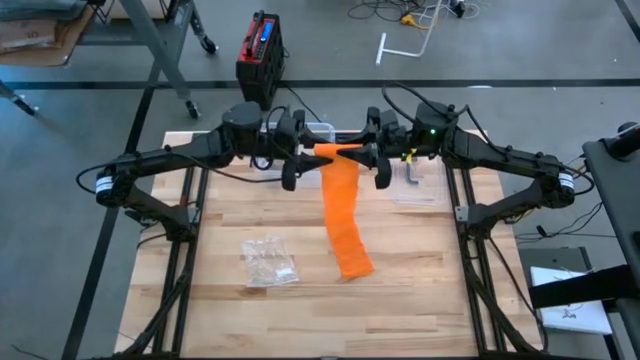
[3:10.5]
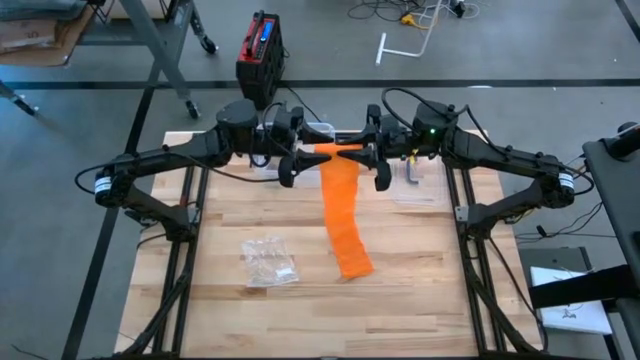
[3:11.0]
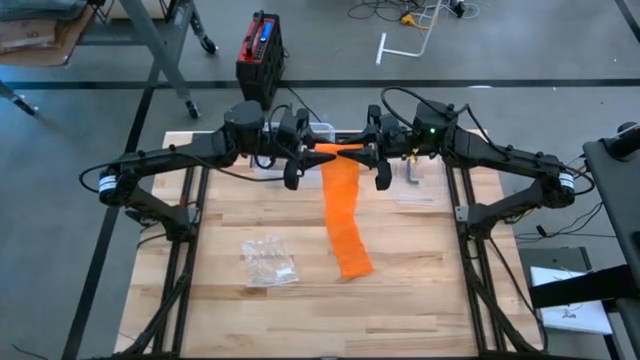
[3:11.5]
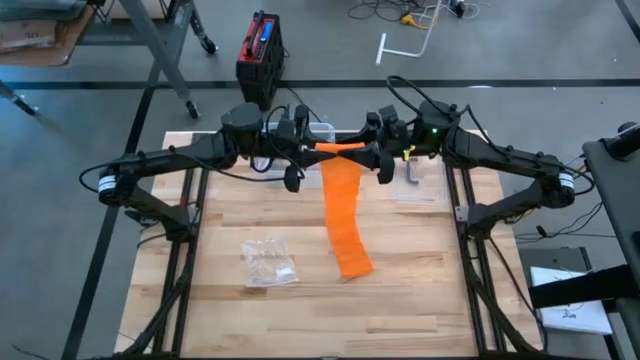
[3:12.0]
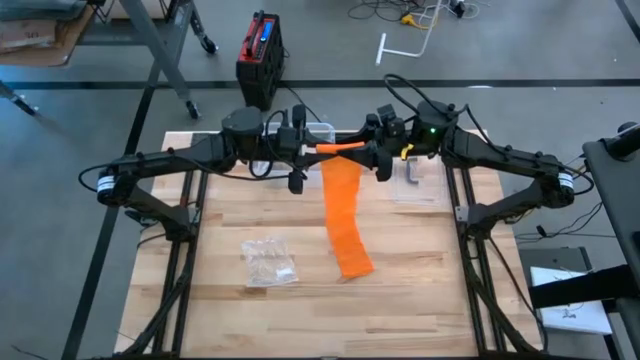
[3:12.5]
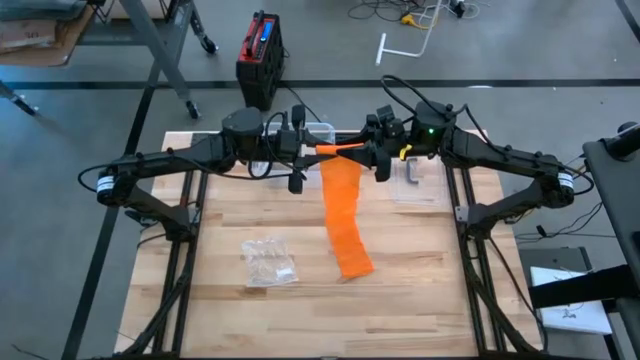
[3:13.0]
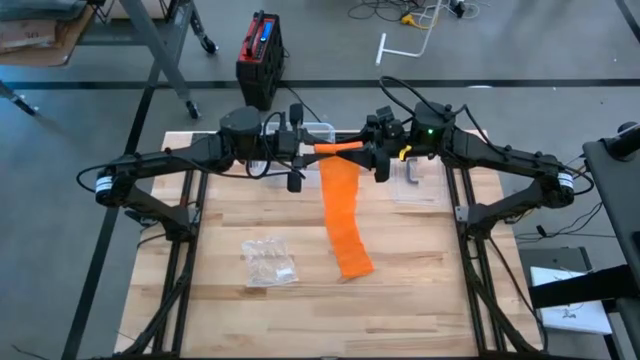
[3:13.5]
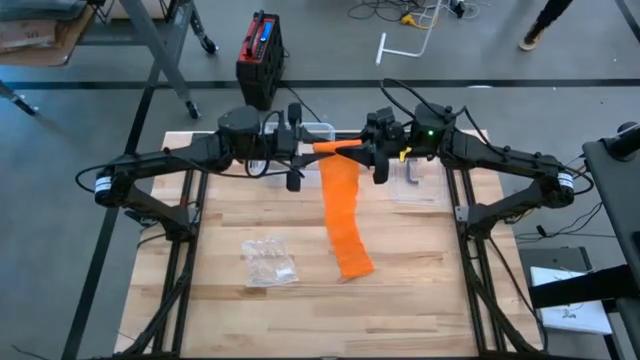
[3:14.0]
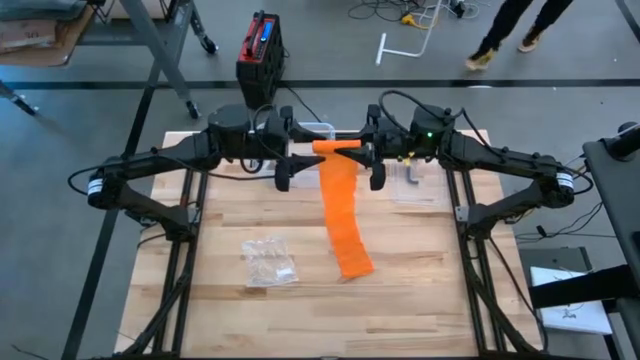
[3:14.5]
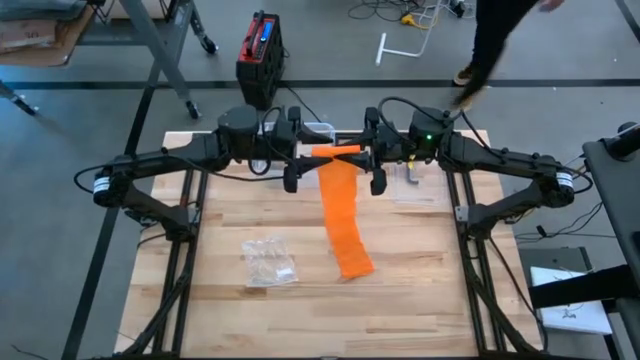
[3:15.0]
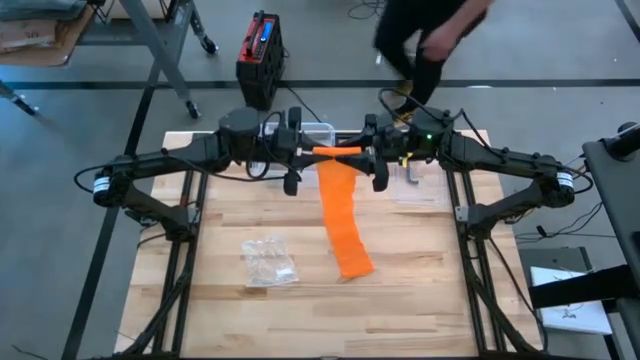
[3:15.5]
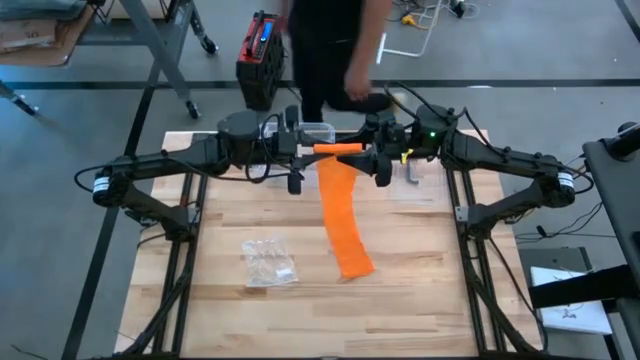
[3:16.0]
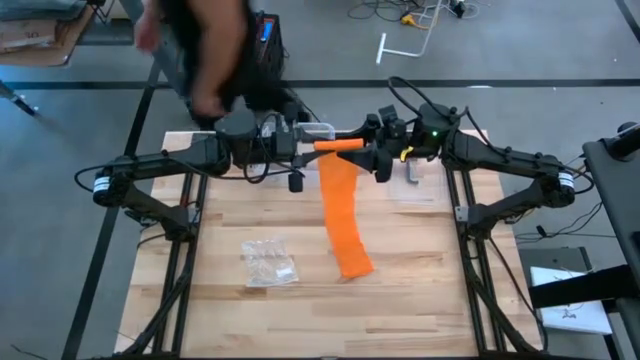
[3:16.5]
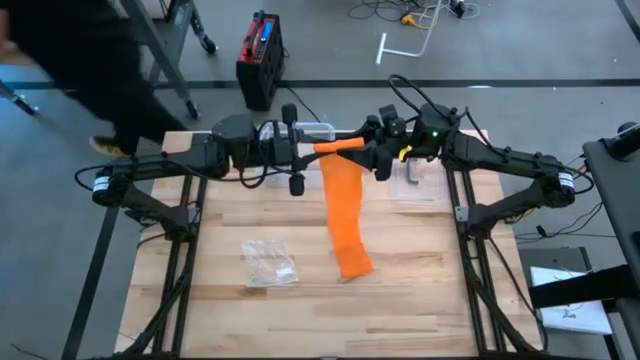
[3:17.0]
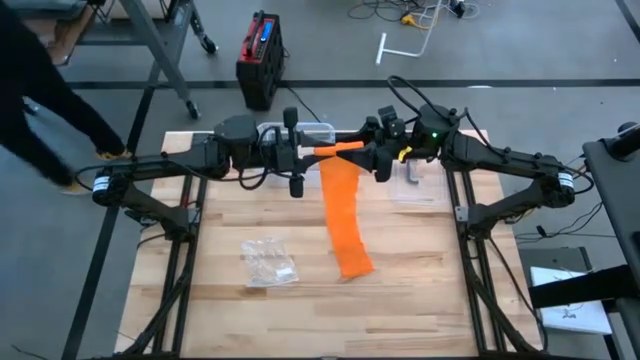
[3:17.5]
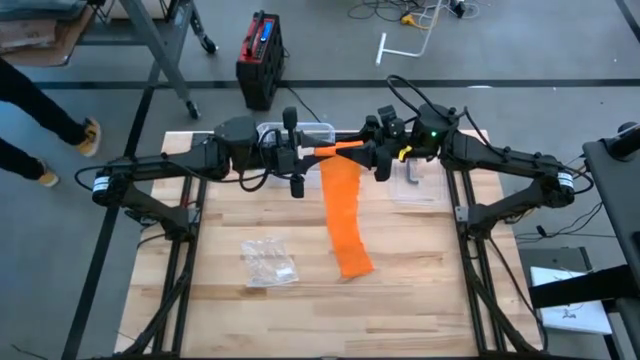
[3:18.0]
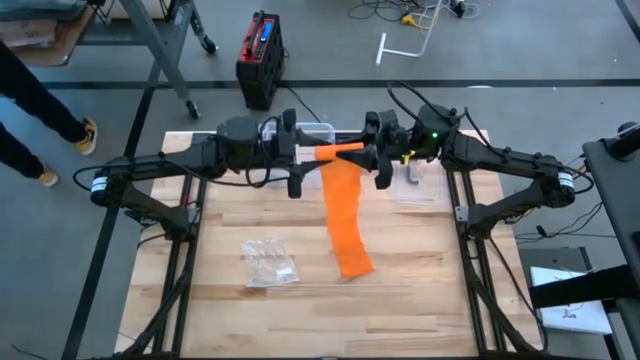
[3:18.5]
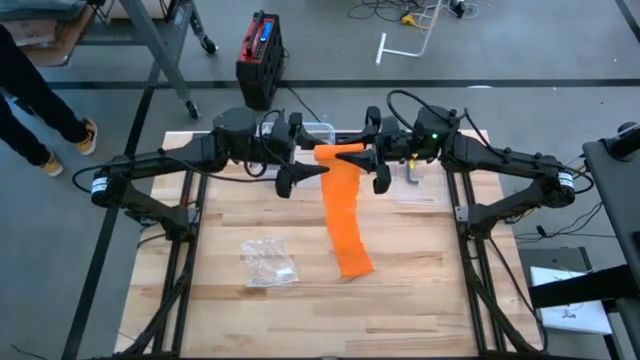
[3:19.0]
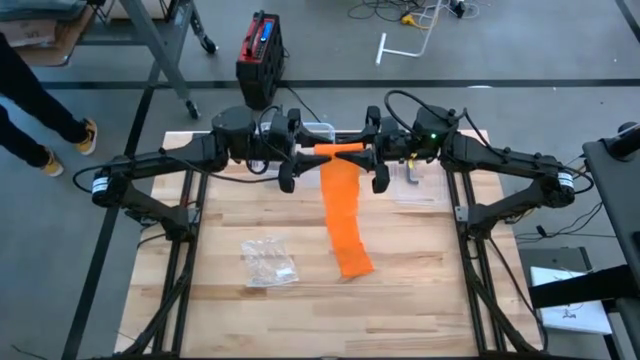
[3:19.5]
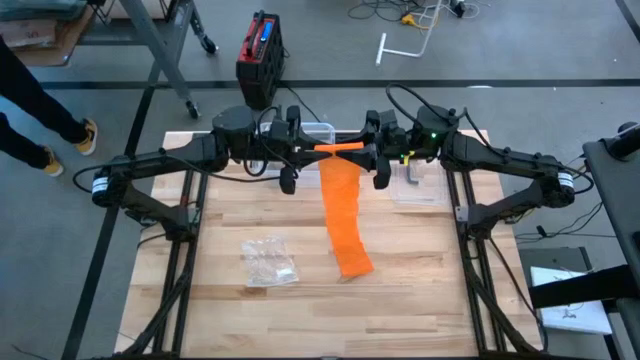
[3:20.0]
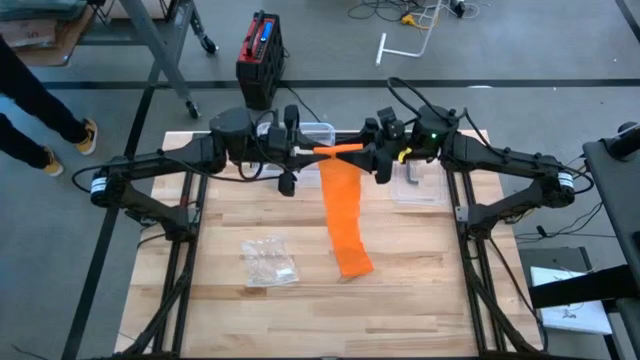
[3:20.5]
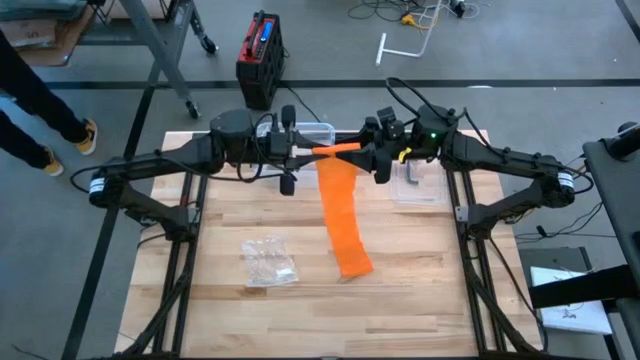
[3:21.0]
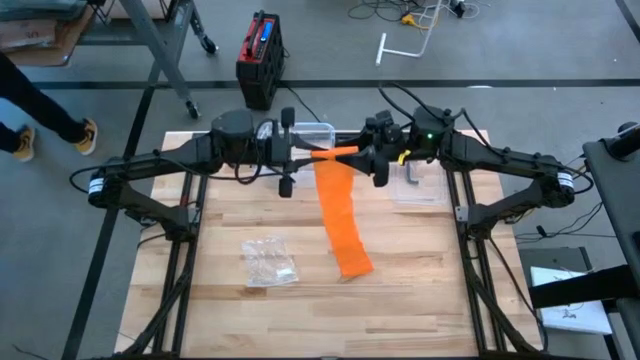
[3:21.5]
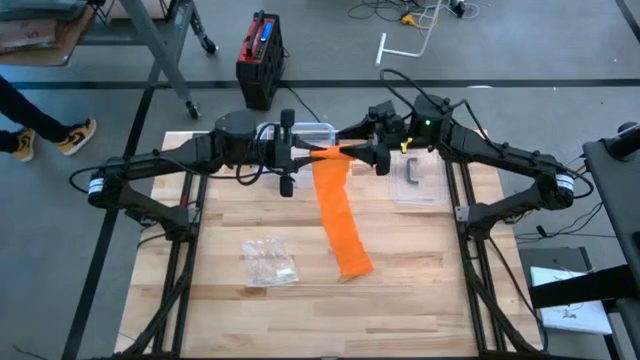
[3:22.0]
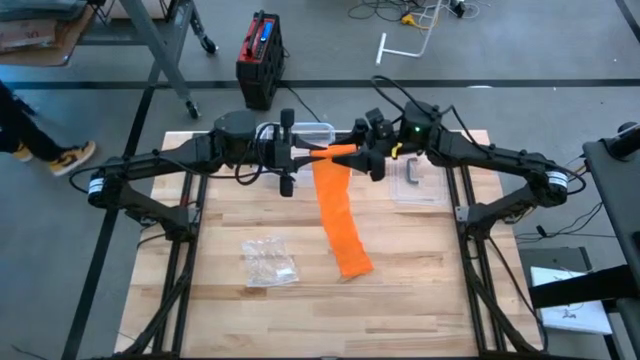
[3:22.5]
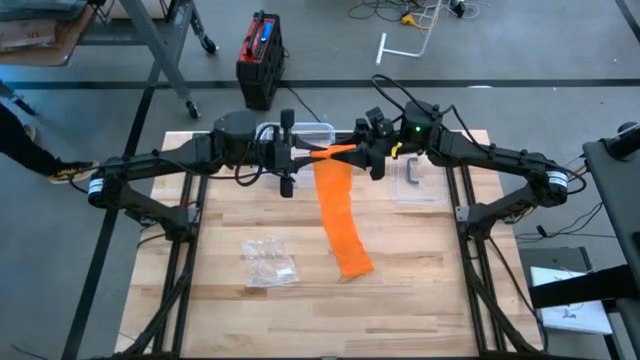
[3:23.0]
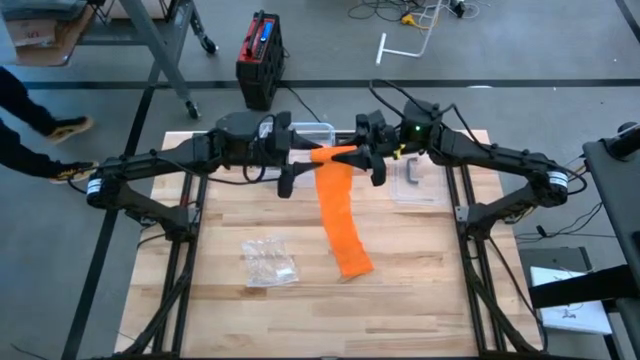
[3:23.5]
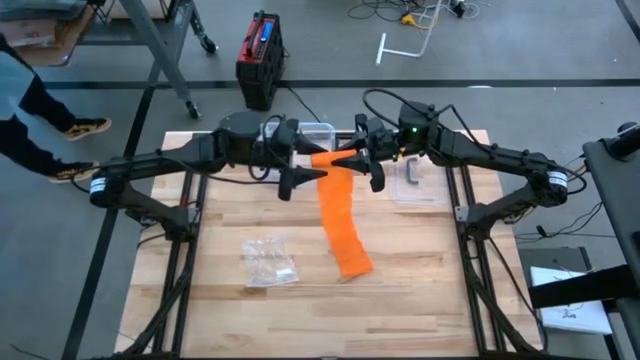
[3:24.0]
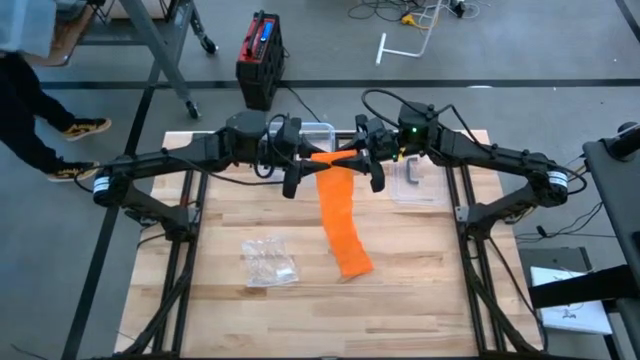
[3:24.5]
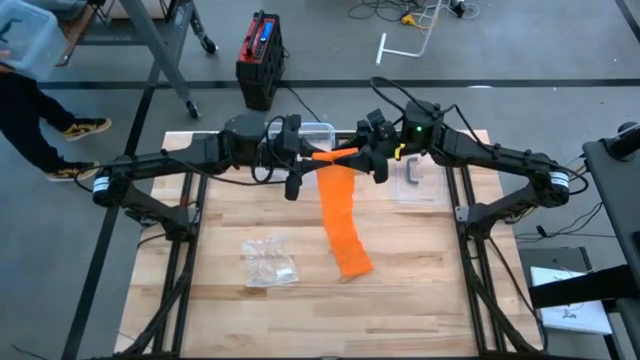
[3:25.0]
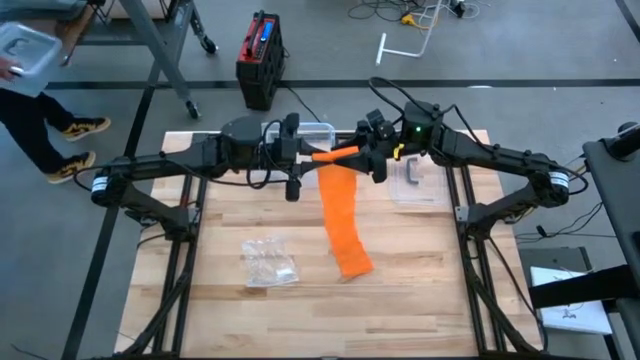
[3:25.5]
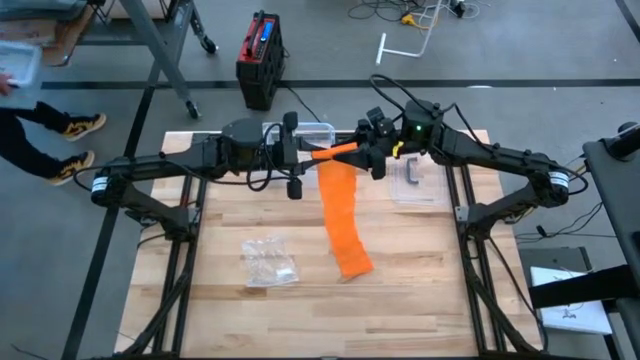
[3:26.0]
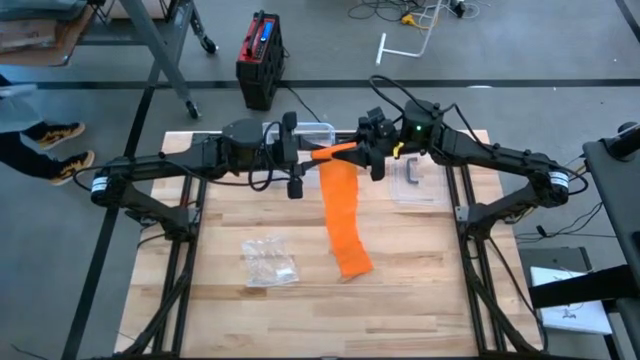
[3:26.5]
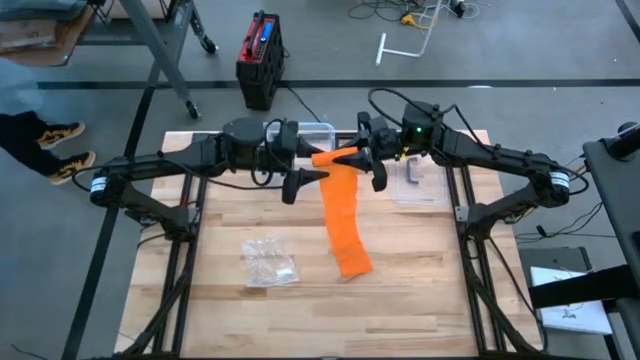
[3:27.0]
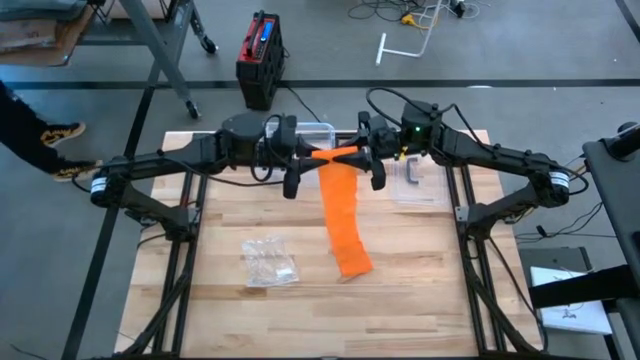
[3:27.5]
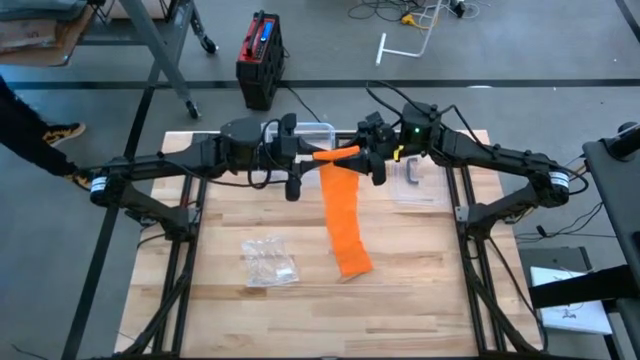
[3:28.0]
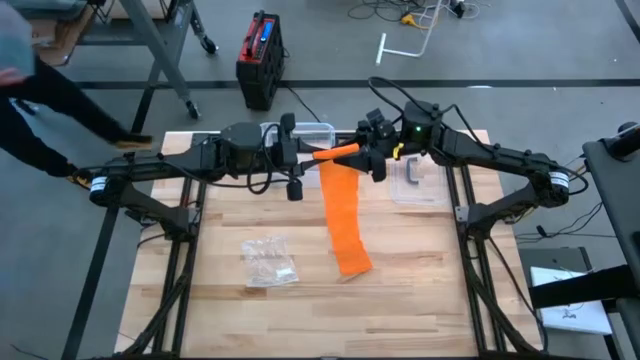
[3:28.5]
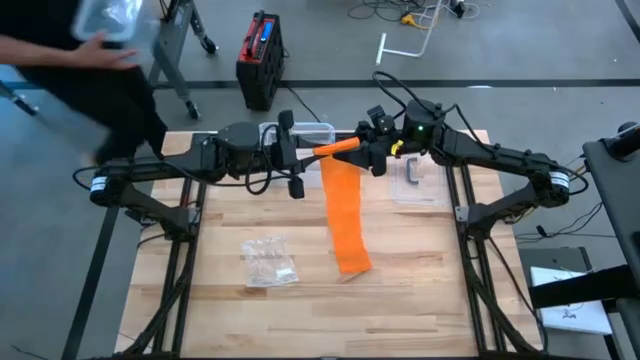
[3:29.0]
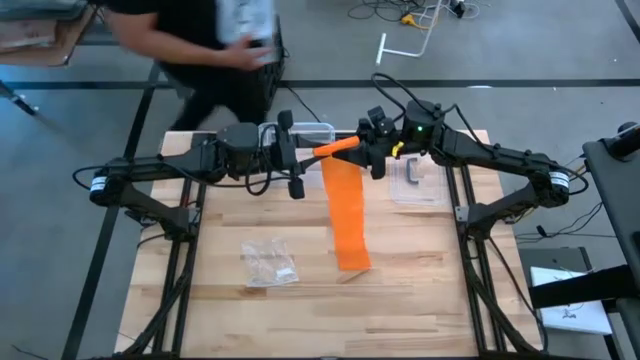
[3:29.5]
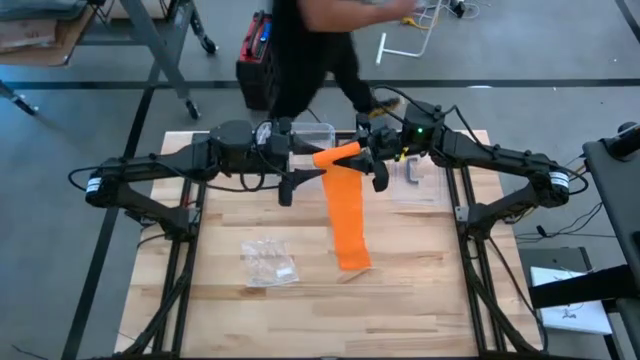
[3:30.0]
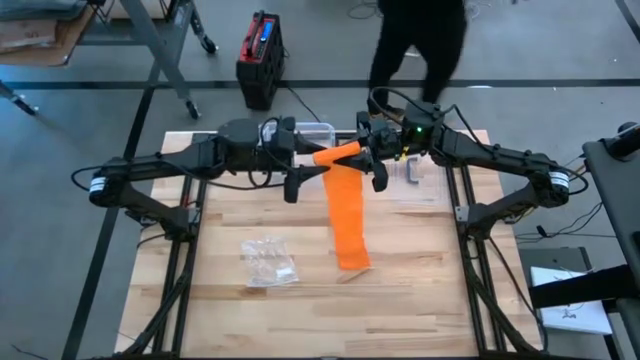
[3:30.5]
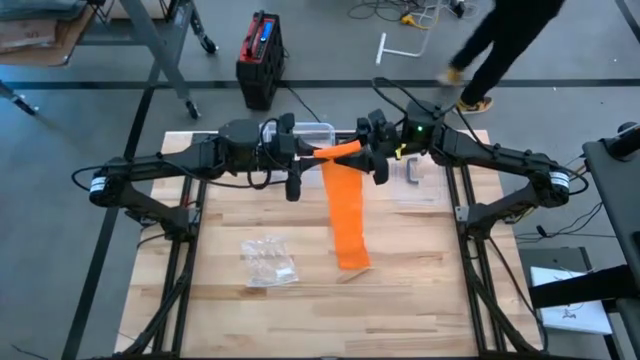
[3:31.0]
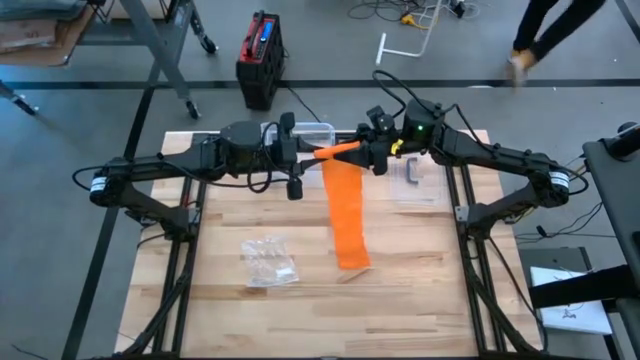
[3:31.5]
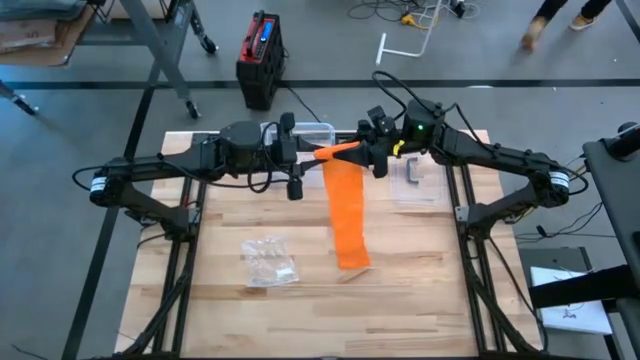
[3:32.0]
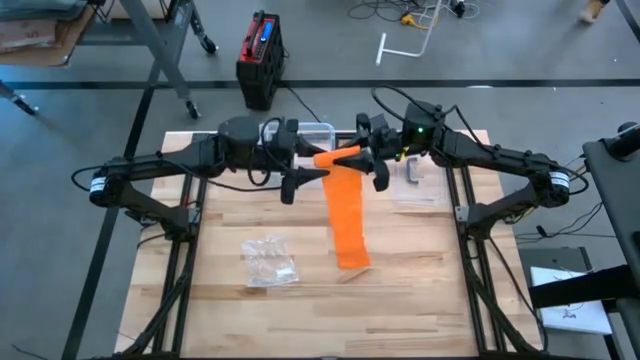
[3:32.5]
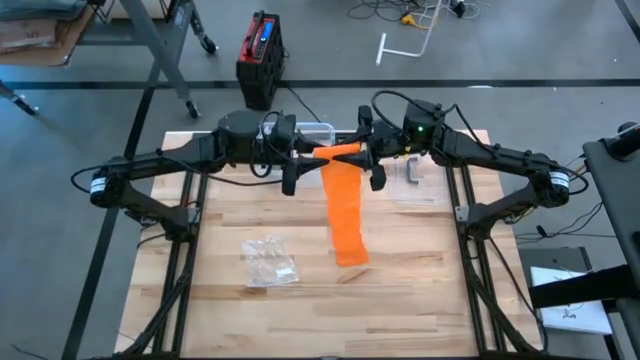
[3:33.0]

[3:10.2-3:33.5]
Task: Roll bandage
Roll the orange bandage
